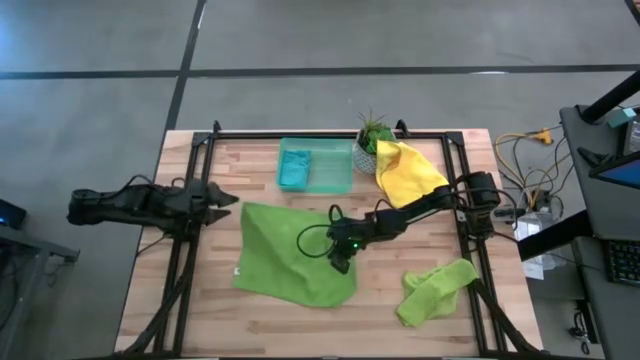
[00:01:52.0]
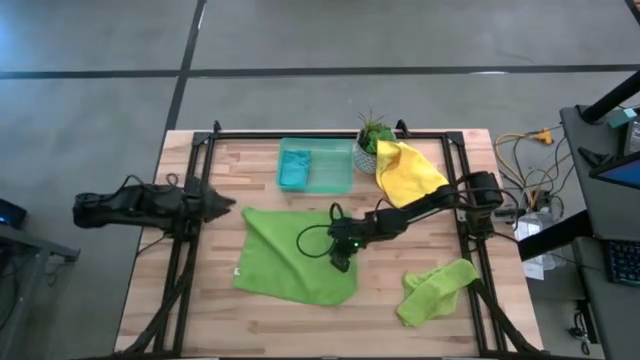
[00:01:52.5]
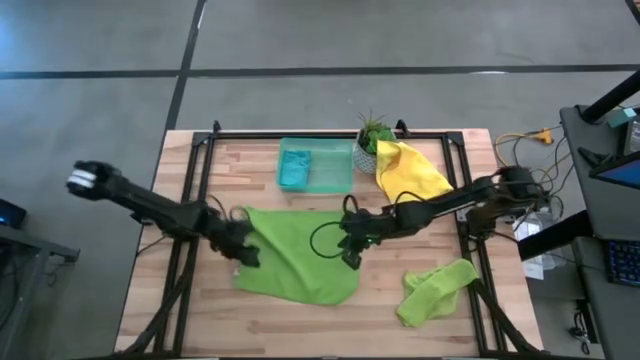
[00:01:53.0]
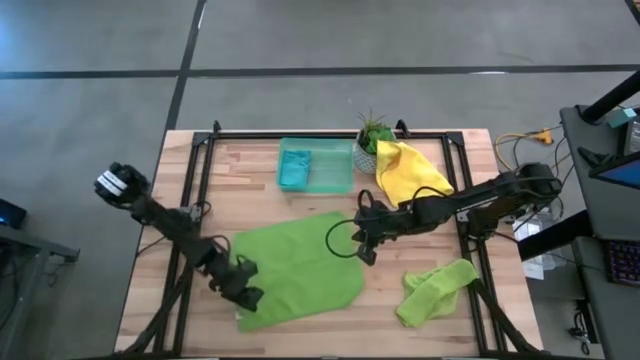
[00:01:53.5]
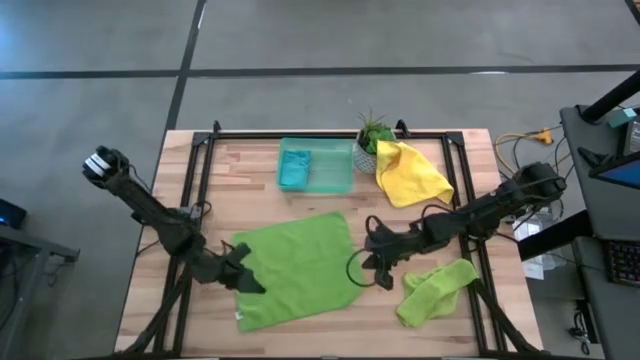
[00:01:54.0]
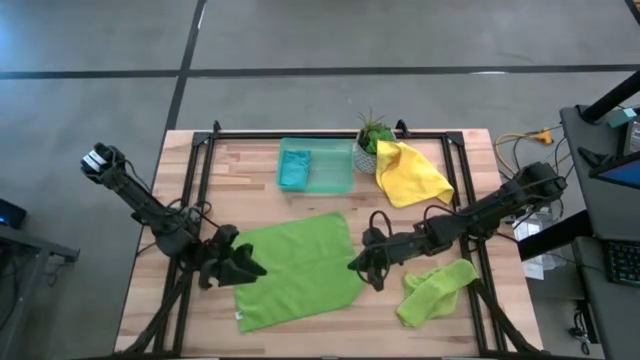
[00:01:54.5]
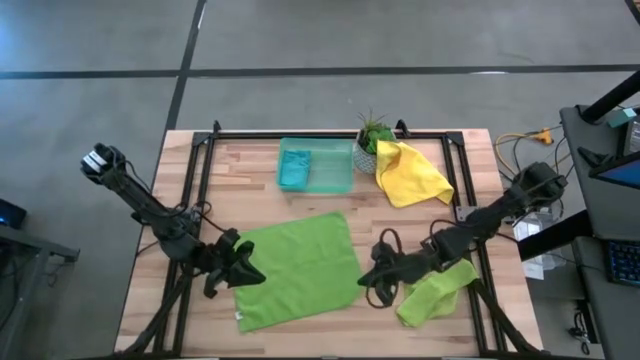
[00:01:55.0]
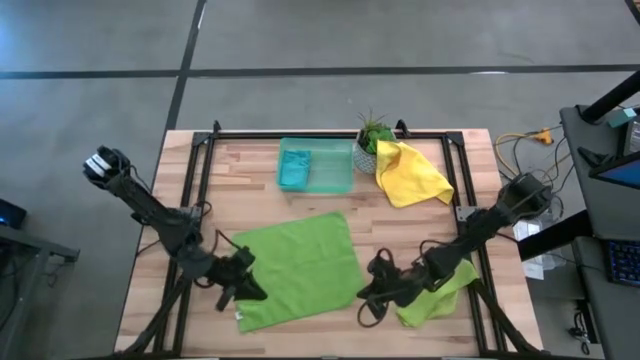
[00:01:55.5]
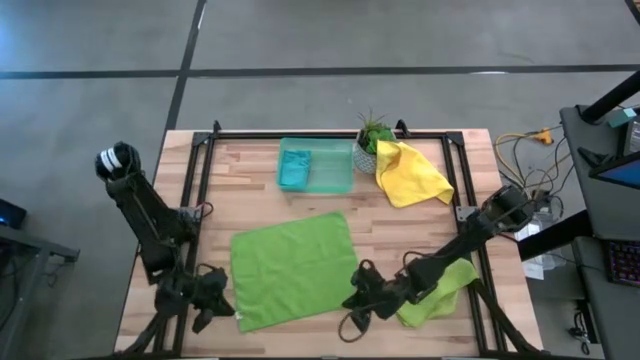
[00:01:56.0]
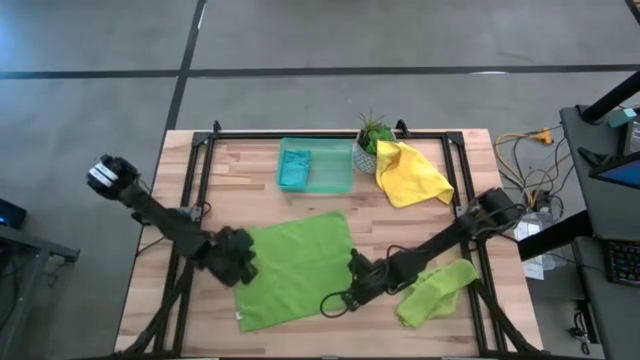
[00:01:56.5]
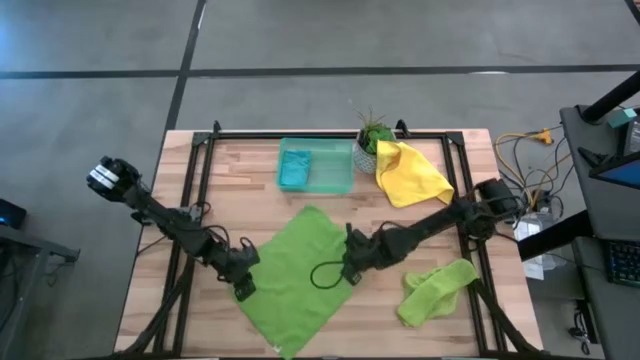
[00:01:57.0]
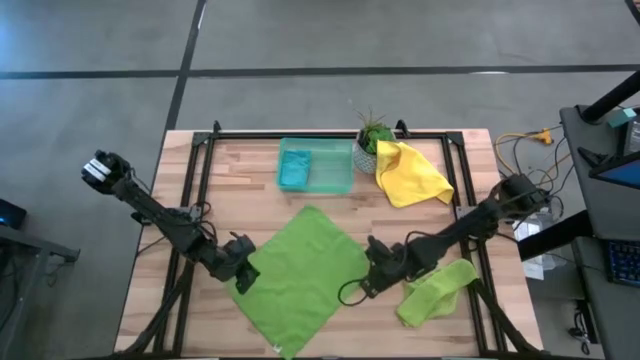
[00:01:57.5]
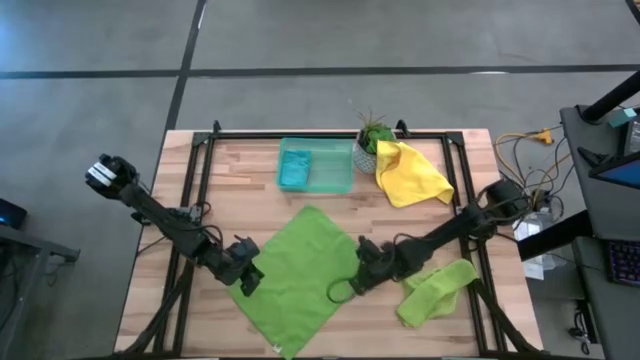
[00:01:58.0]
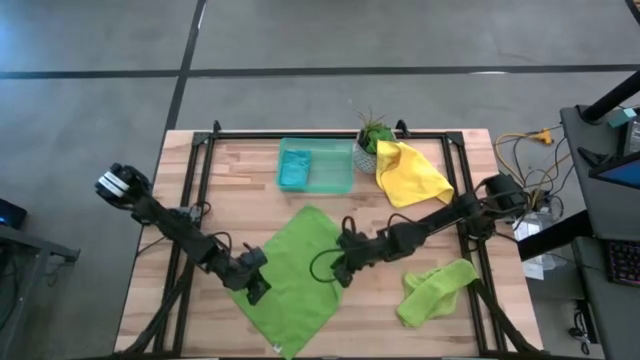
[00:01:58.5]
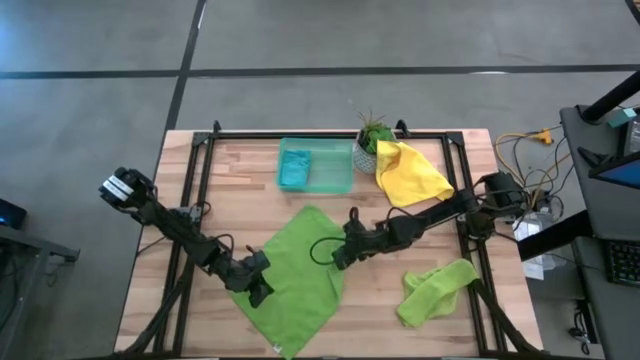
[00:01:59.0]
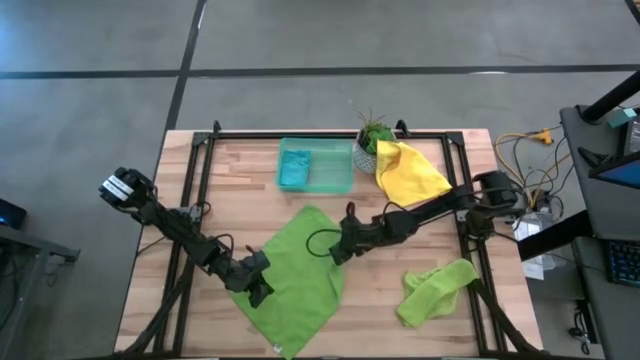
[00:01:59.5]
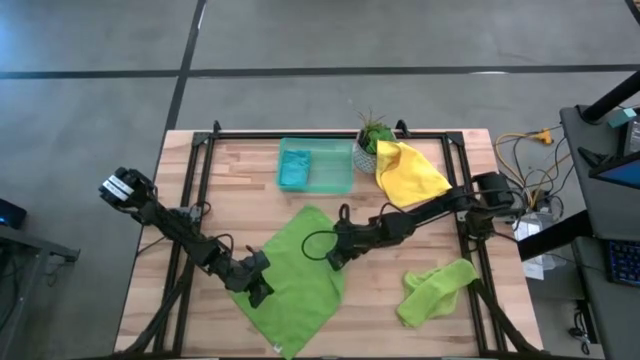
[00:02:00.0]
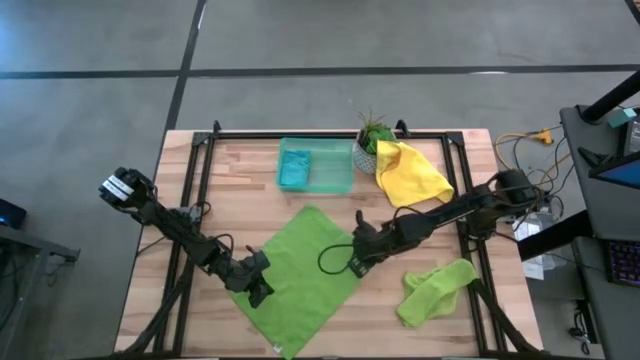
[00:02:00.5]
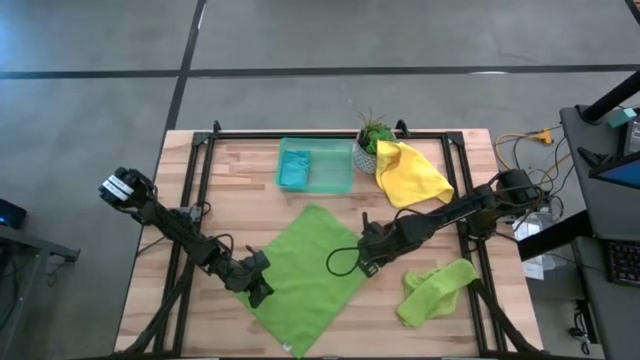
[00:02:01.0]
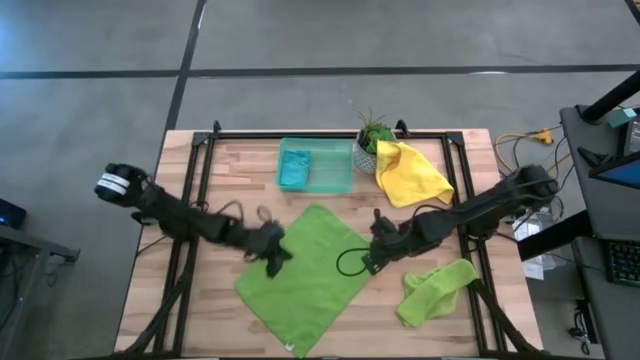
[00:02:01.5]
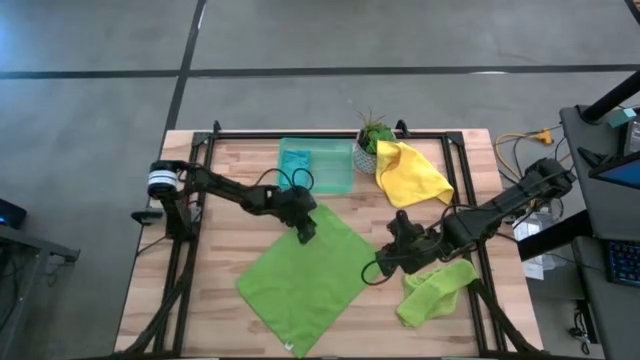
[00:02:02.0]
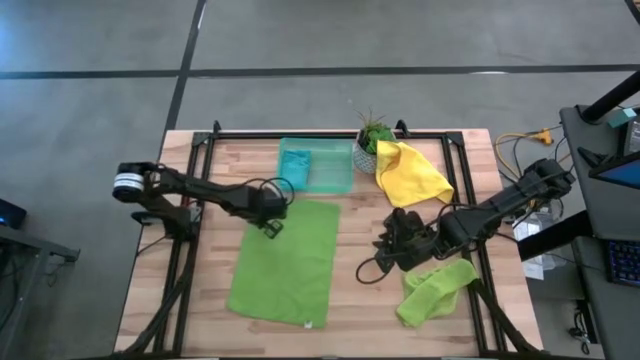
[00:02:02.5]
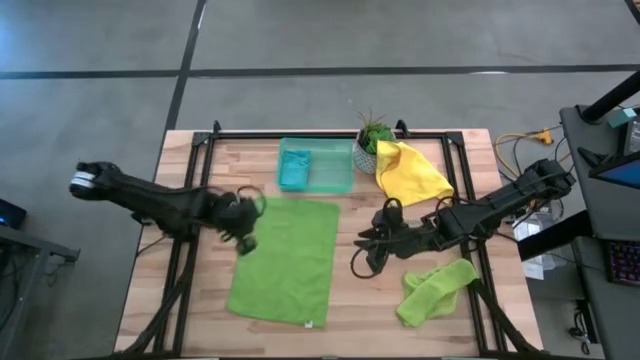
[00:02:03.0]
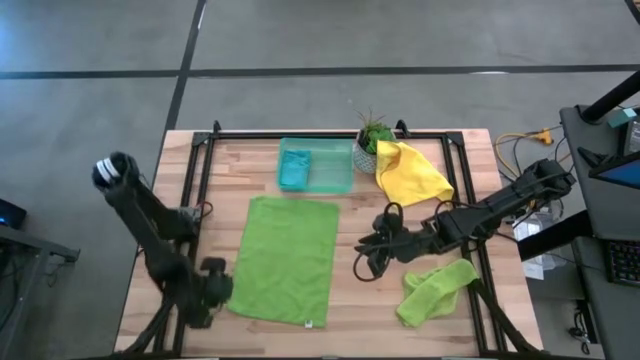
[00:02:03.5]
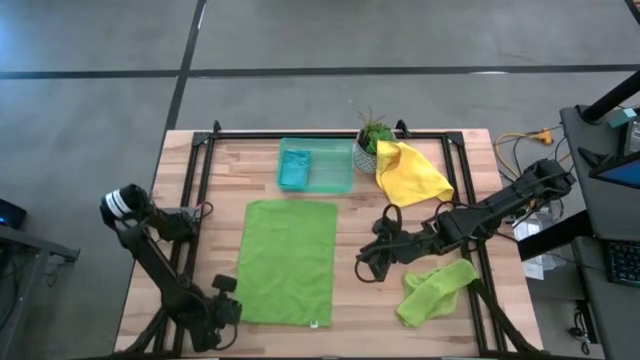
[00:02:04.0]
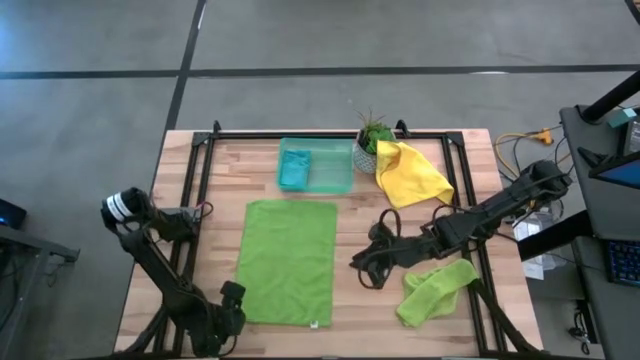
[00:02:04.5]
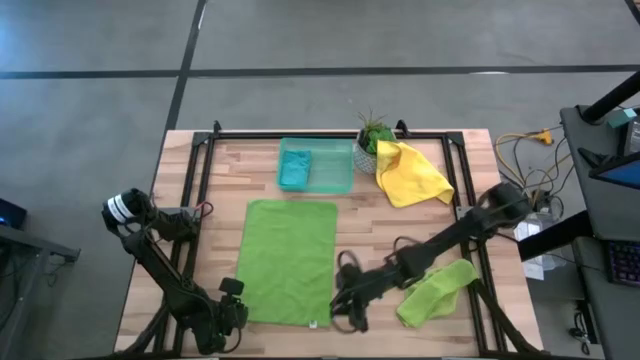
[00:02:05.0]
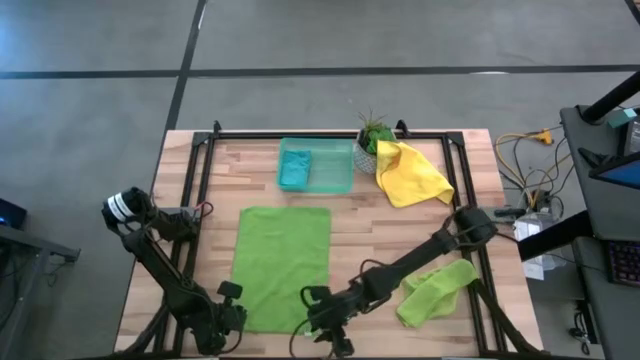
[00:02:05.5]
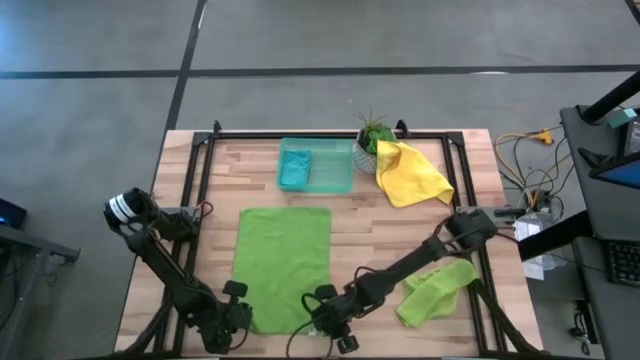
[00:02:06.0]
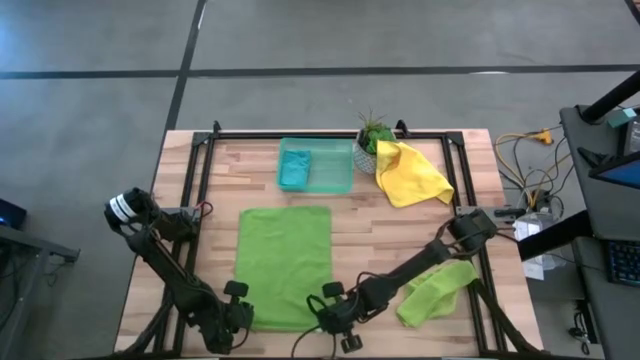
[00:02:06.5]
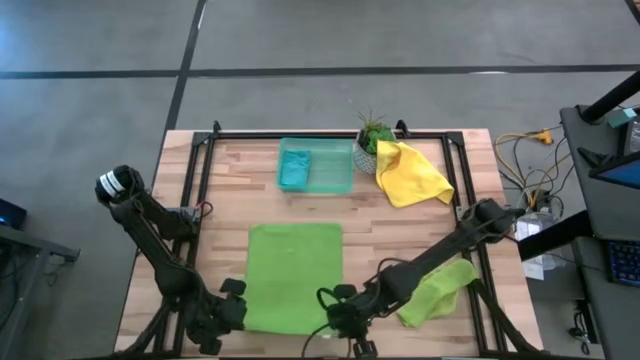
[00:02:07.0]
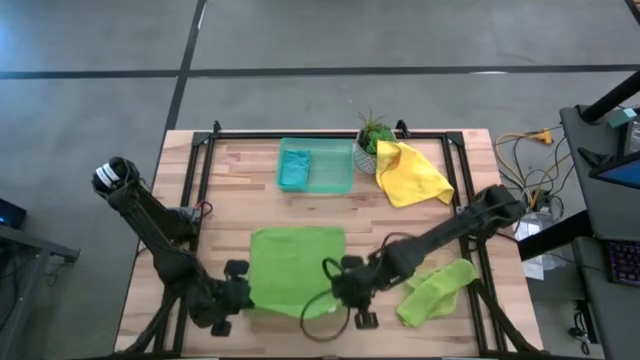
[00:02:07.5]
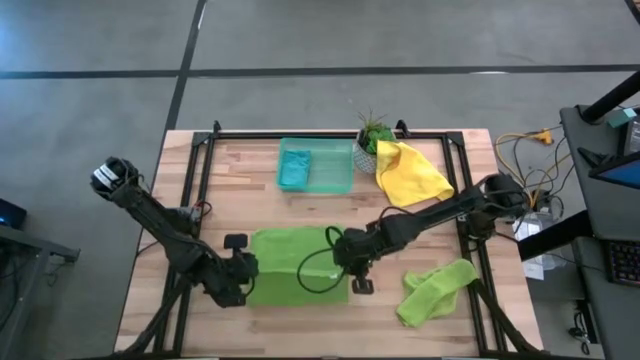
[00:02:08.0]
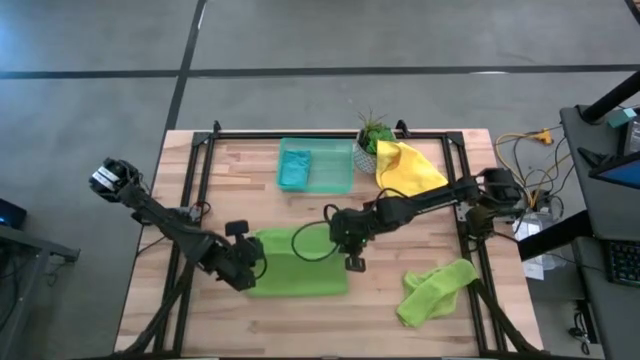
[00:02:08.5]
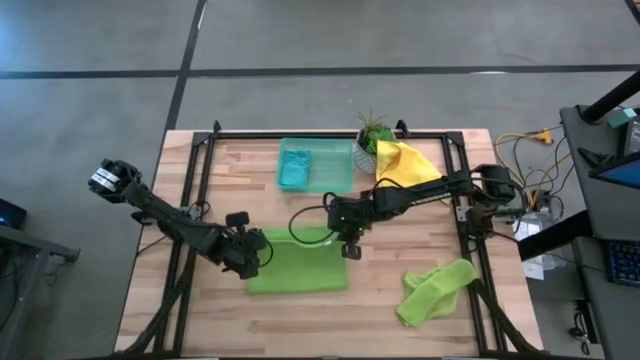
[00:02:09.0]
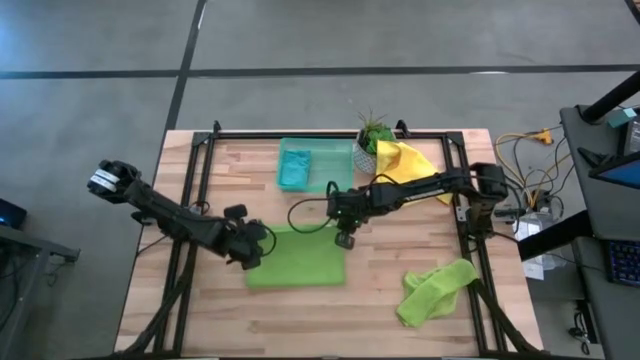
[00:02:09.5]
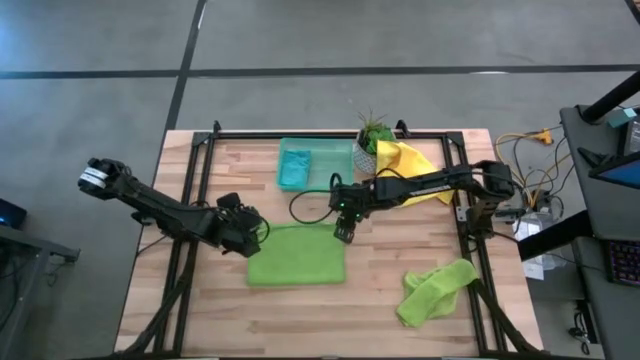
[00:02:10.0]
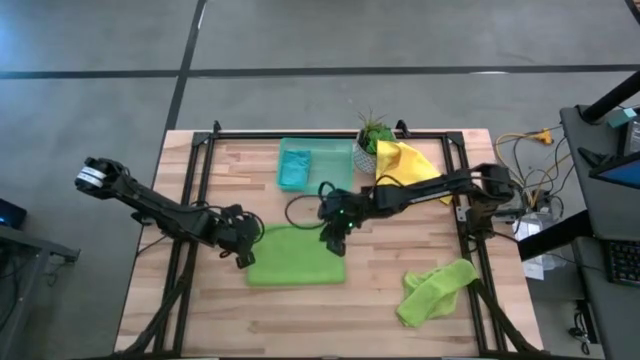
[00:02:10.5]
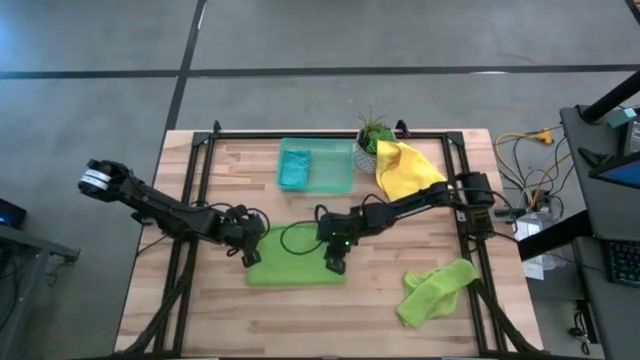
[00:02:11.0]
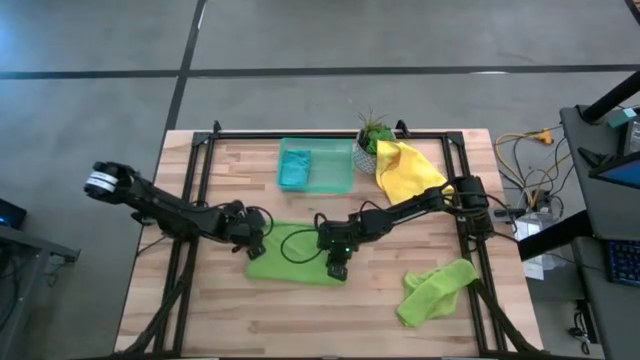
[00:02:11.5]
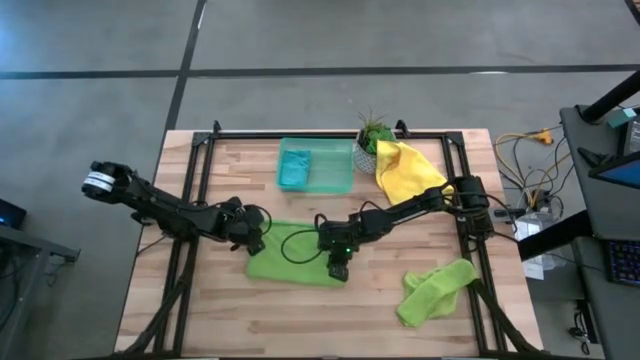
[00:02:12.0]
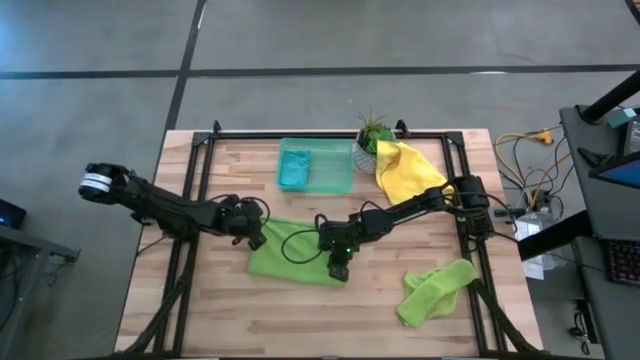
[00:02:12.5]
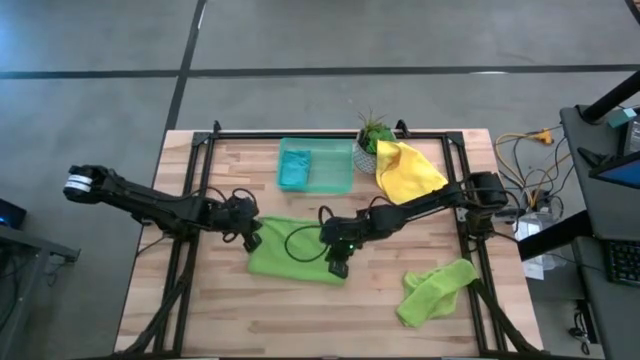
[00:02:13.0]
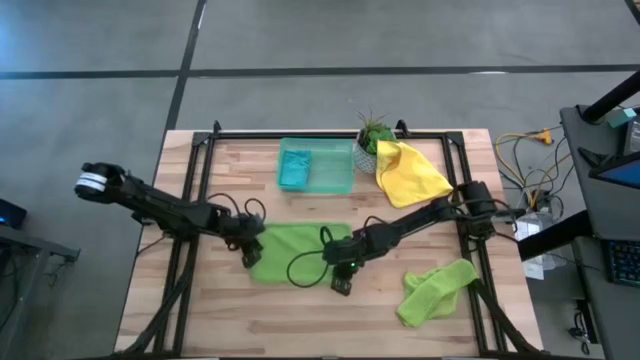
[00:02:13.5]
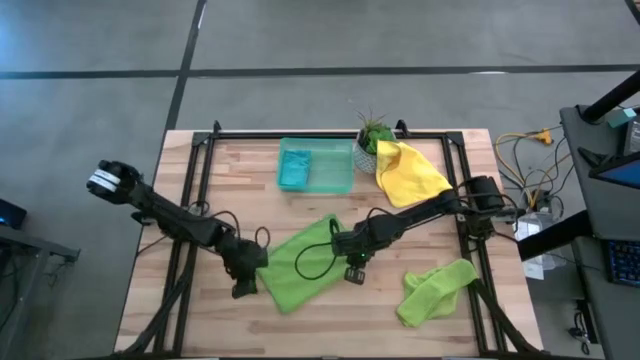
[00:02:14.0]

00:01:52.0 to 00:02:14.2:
Task: Fold microfiber towels
Fold the green microfiber towel
